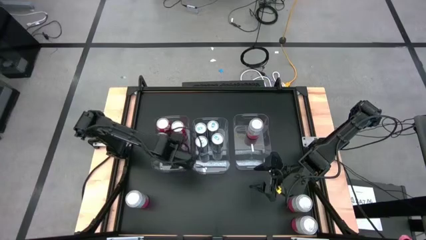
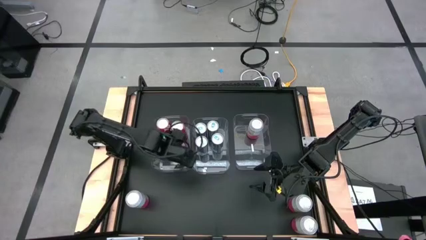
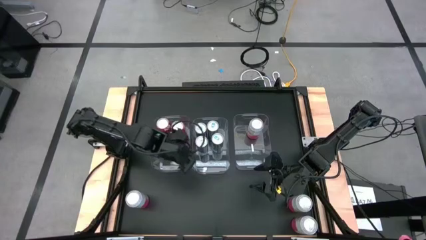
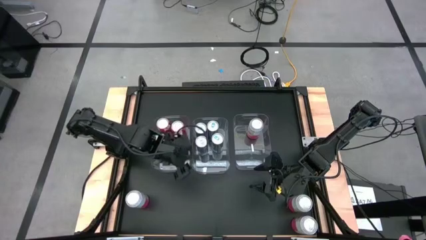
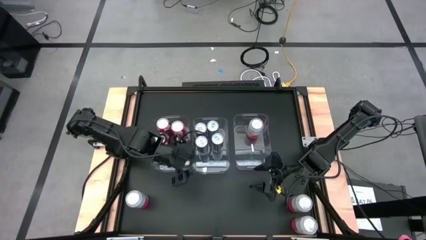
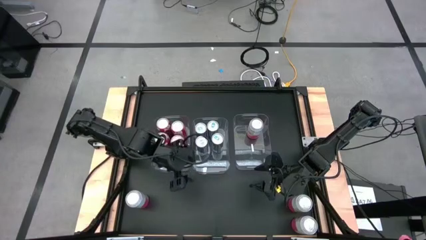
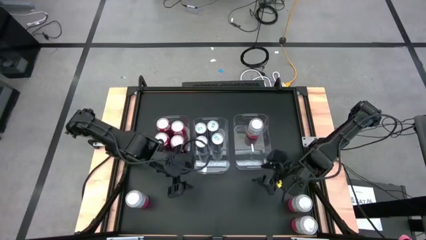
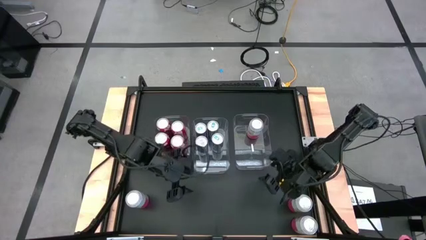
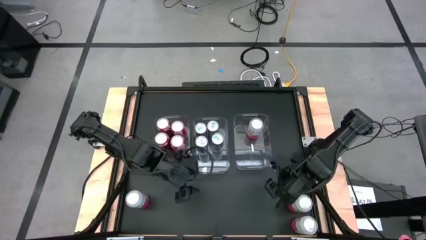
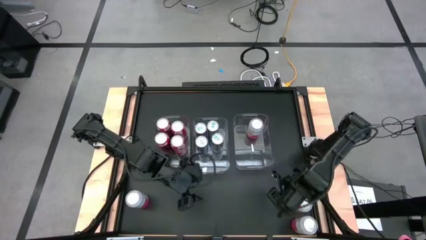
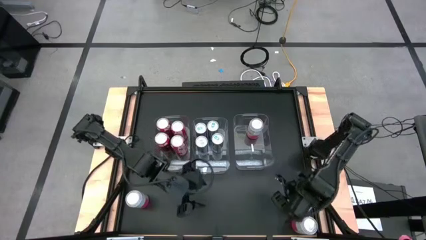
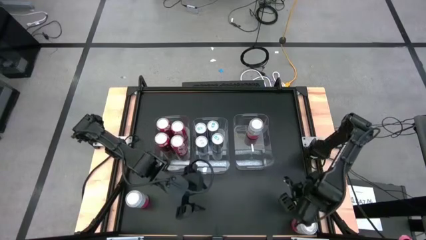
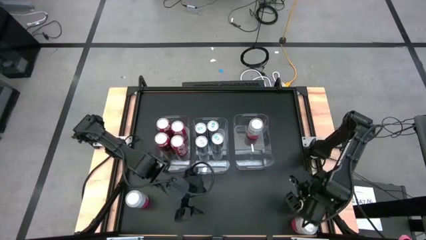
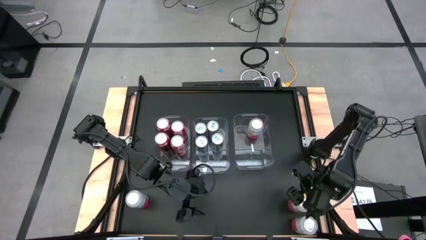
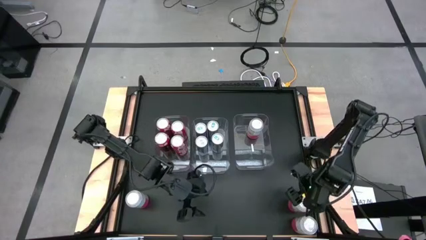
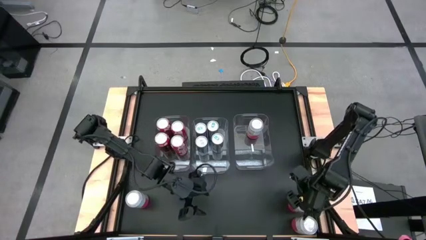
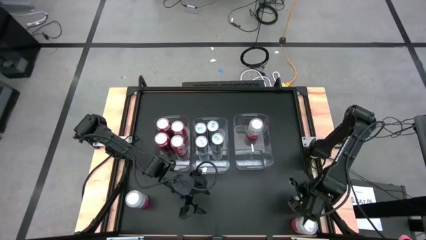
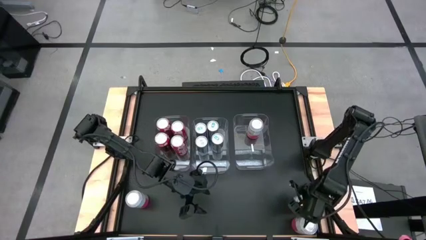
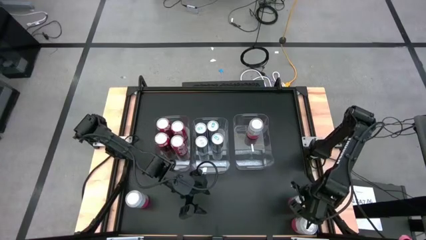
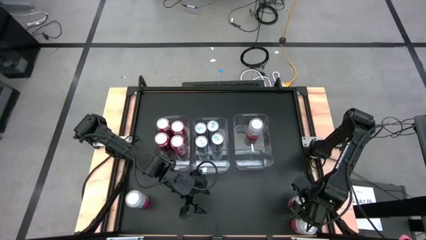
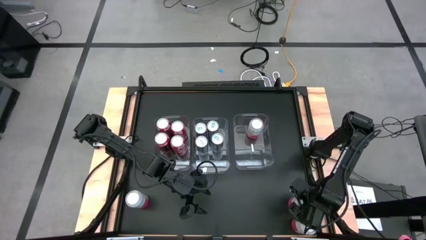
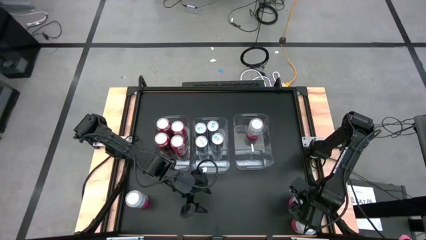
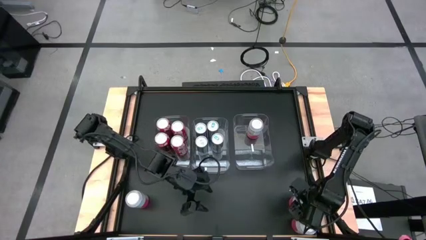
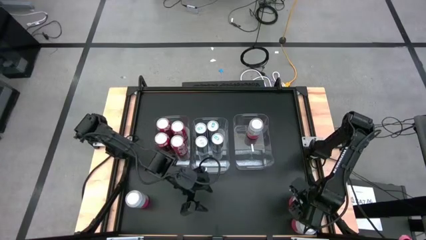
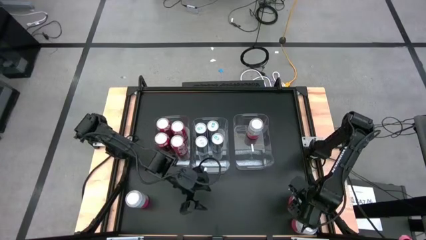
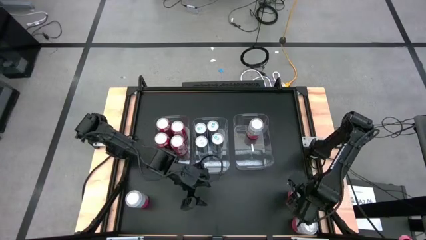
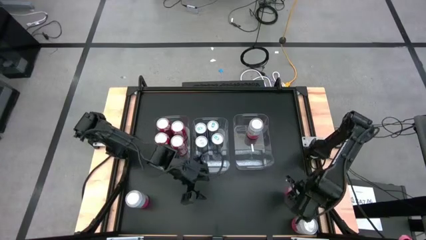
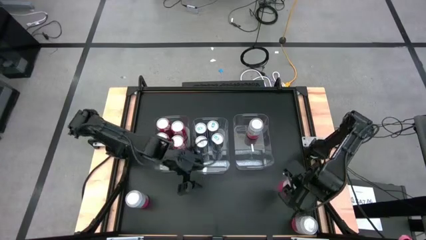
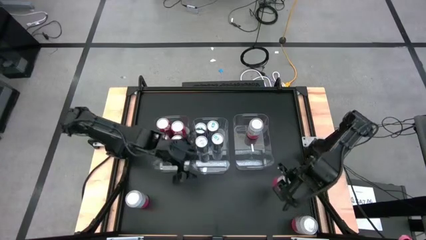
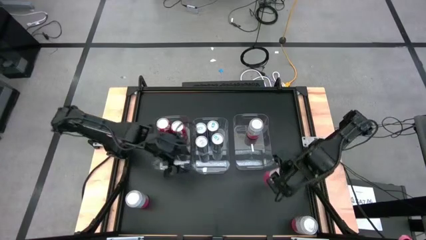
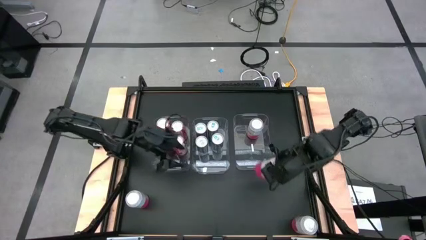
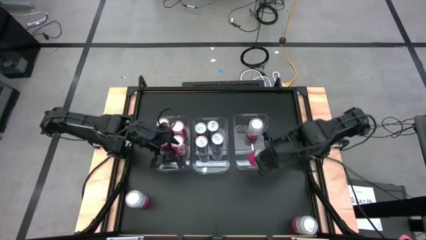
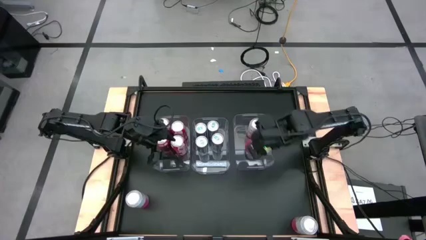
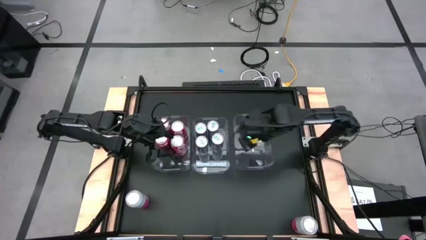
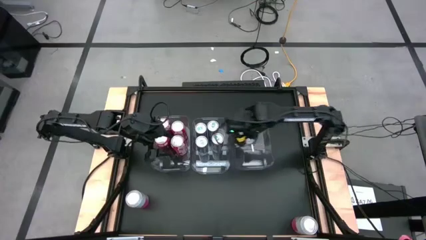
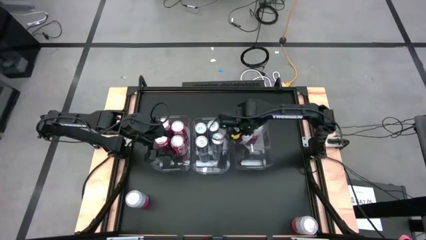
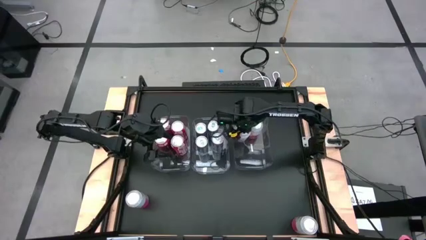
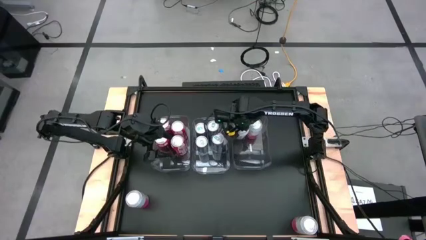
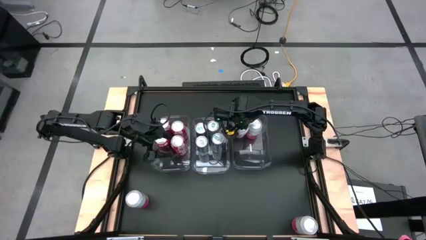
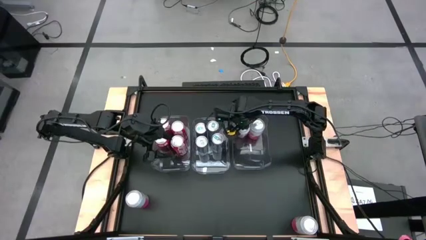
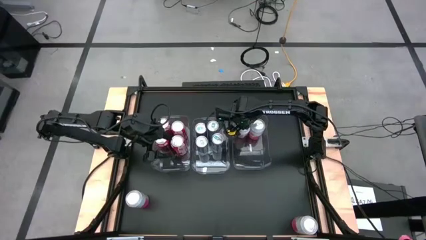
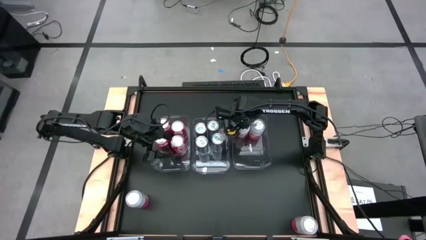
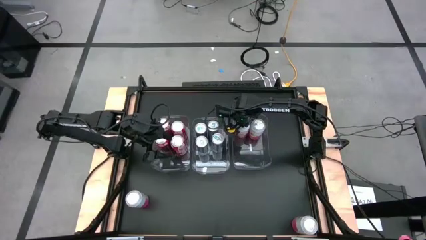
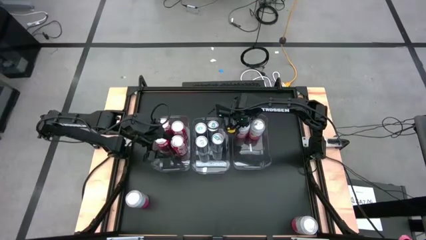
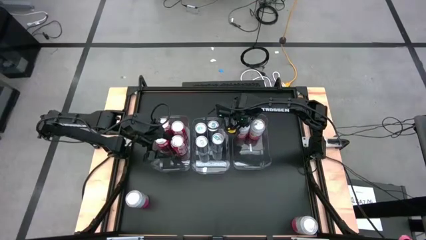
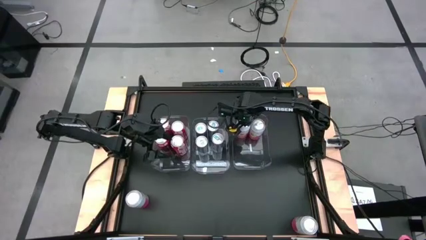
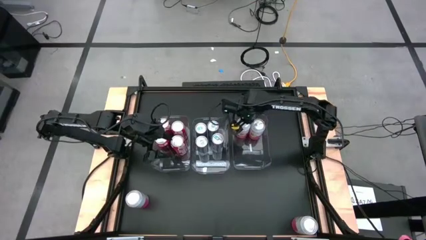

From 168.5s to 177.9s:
Task: Sort soda cans
Put the pink-white soda can to the right transparent bin

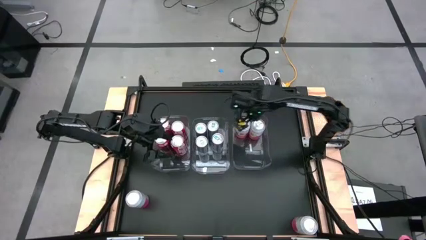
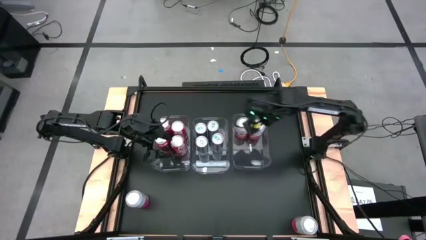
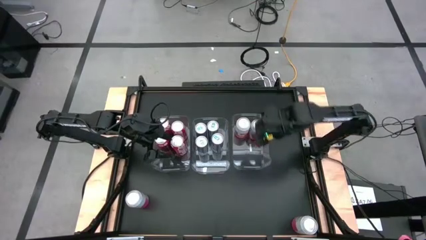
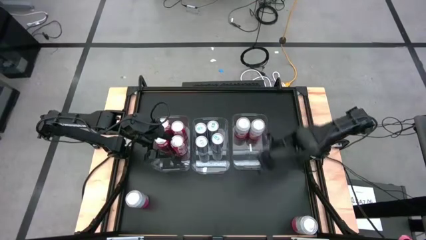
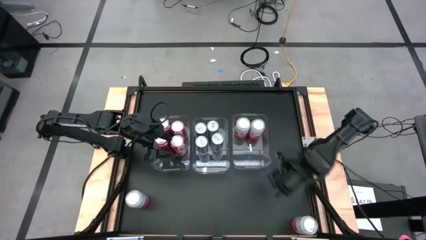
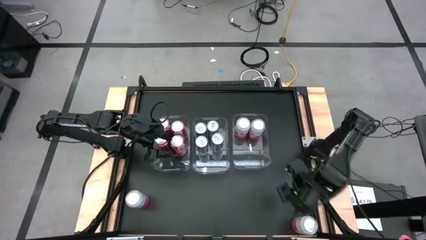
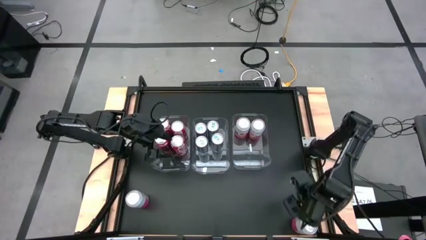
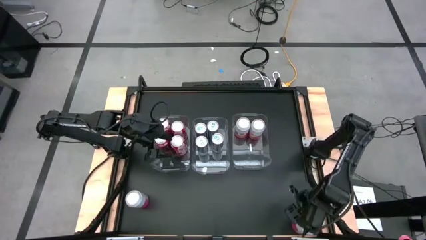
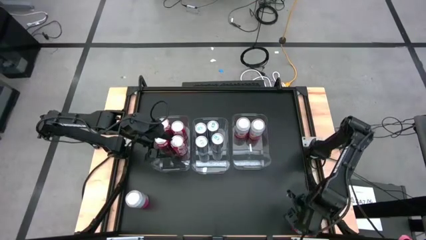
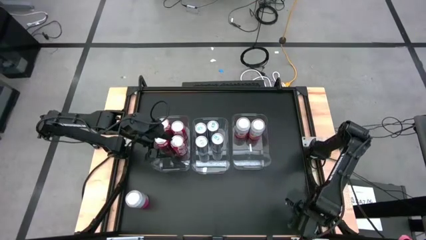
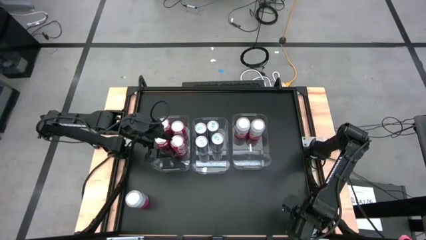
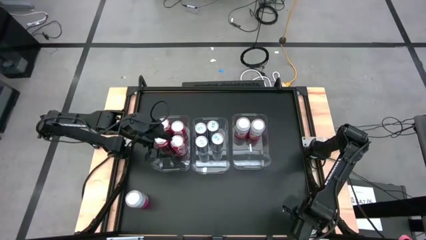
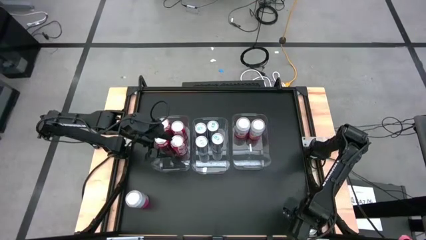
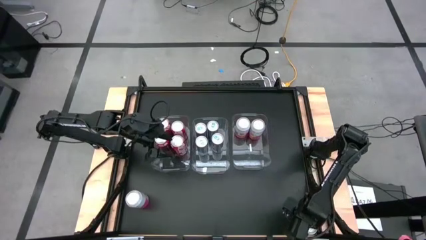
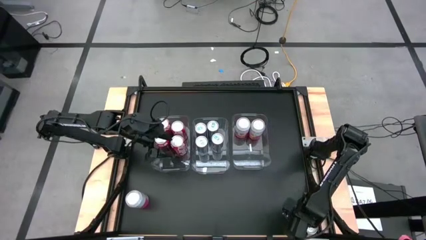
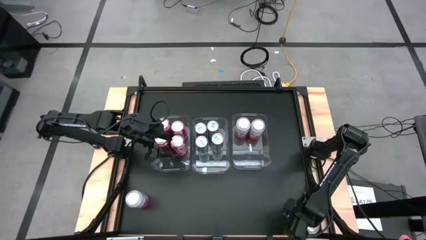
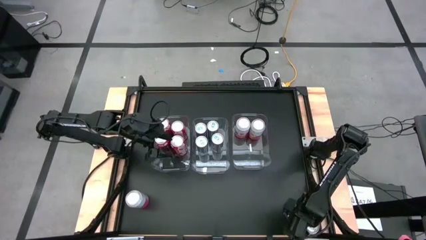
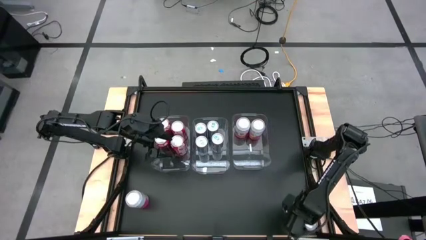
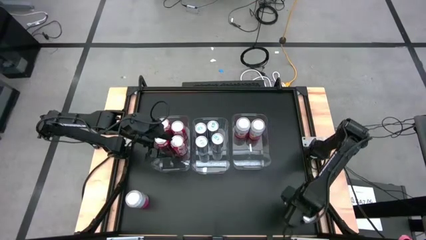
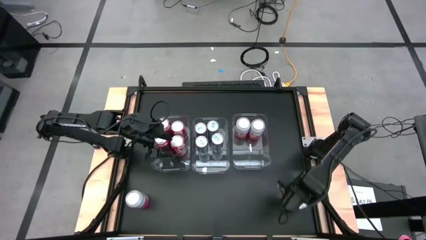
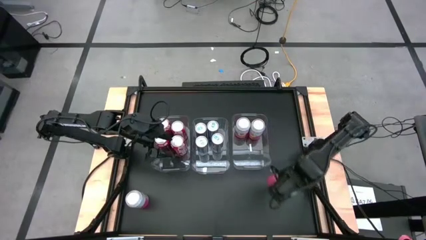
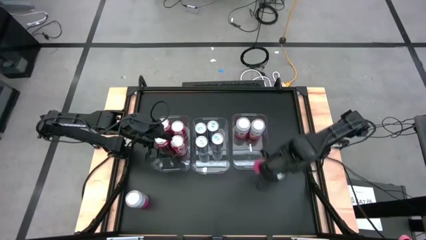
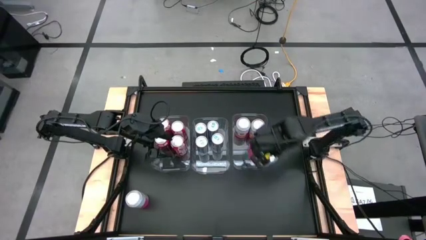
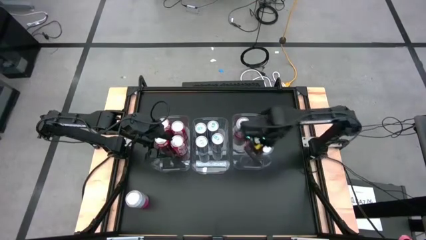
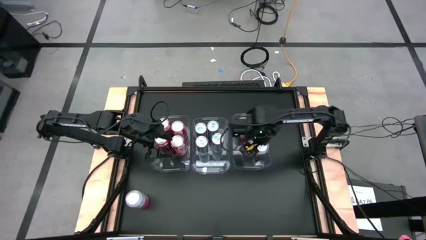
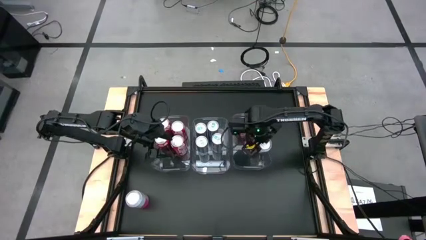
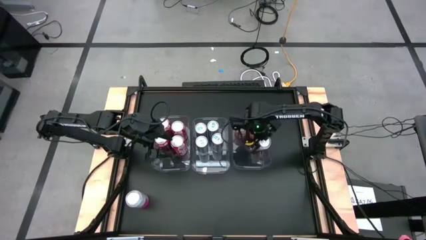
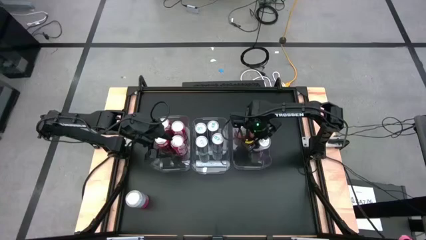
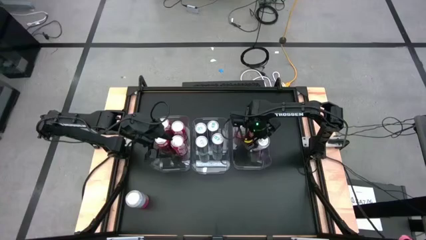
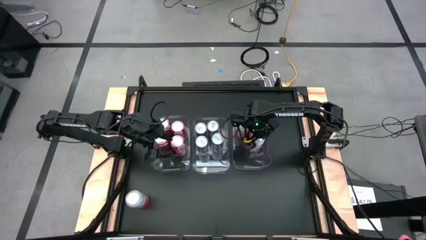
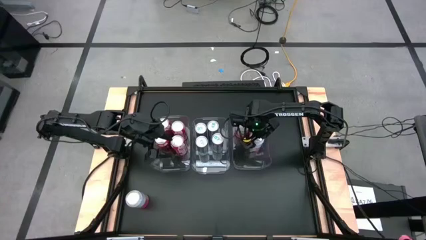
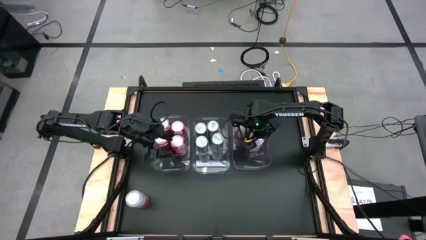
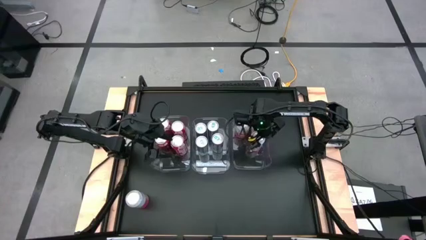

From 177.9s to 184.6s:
Put the pink-white soda can to the right transparent bin
